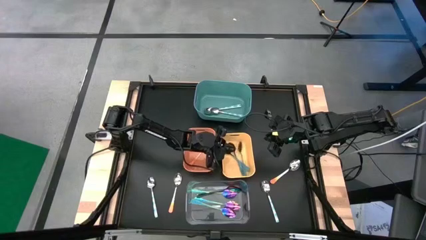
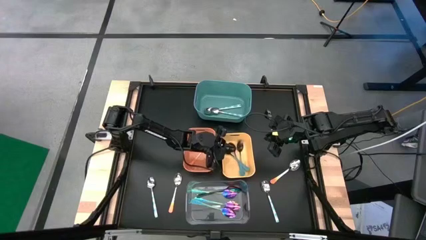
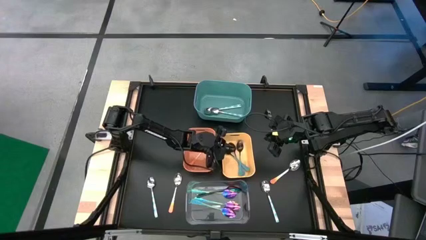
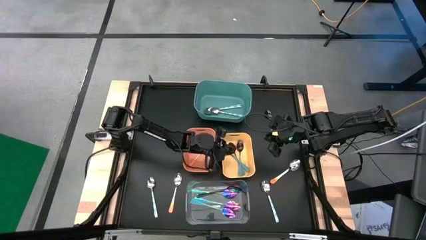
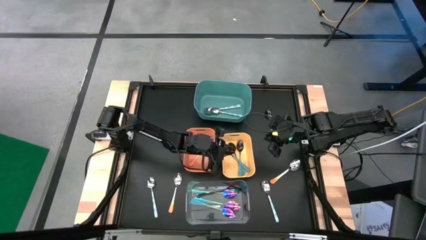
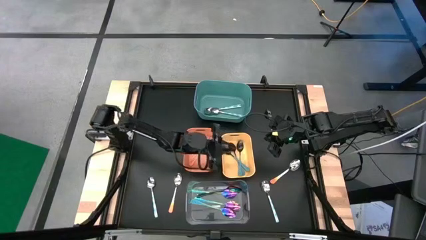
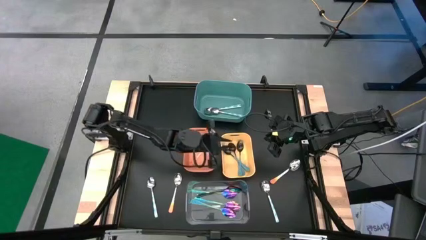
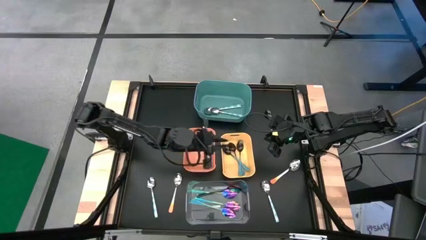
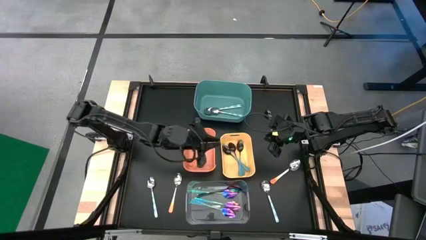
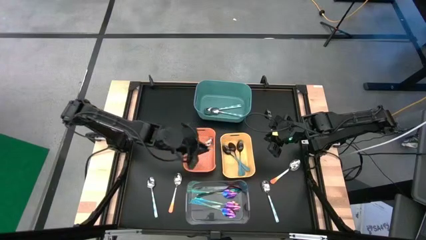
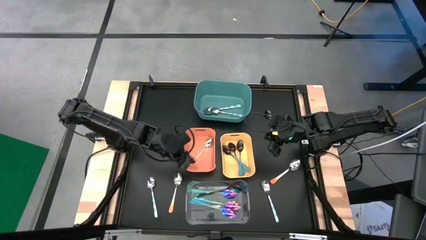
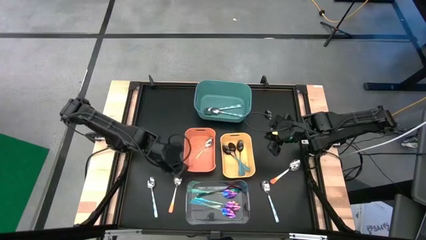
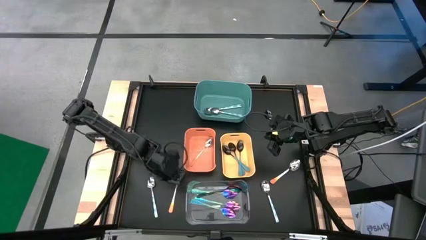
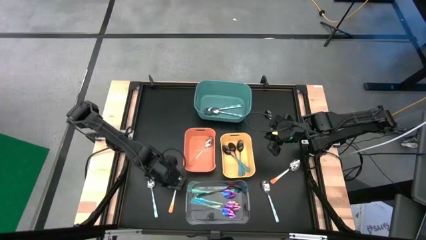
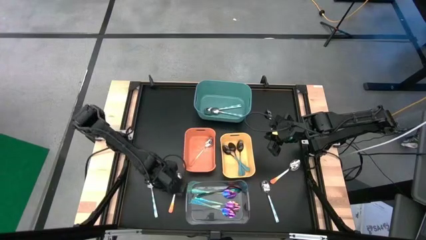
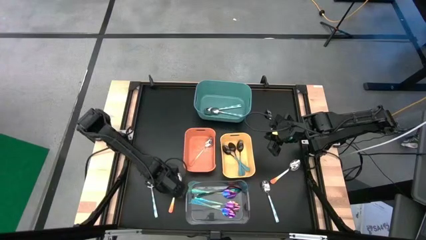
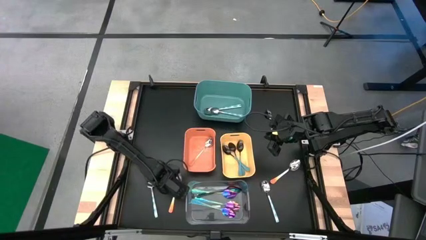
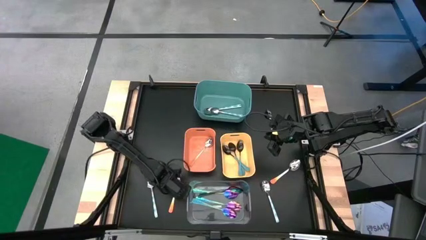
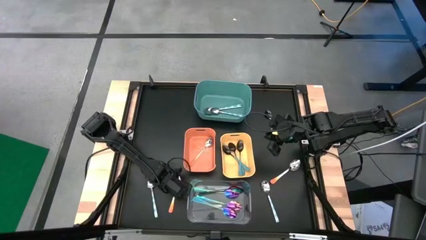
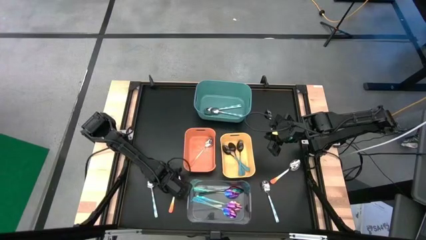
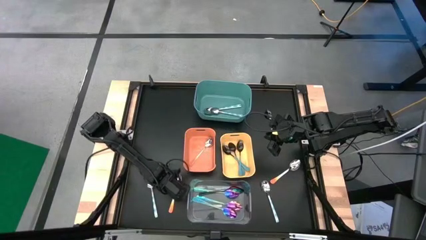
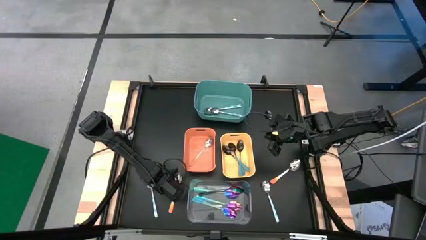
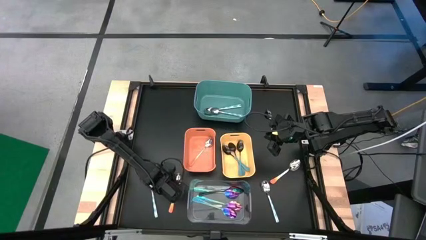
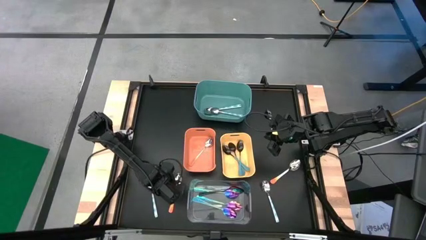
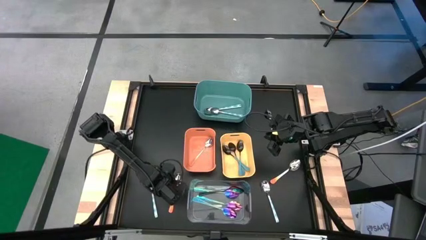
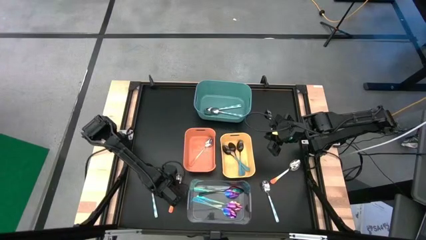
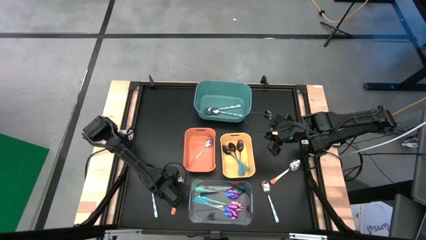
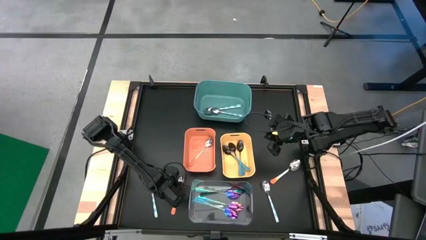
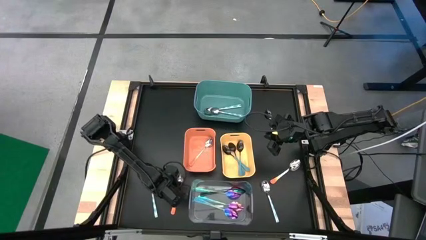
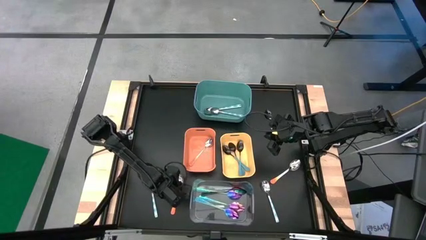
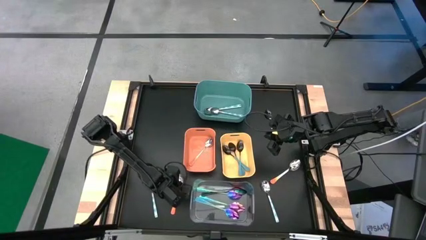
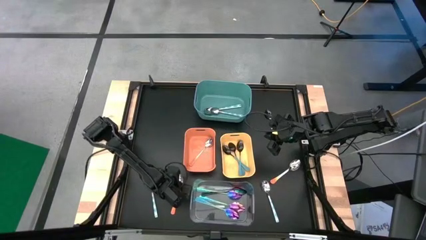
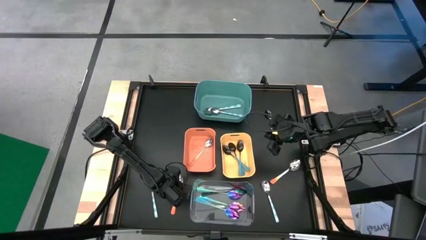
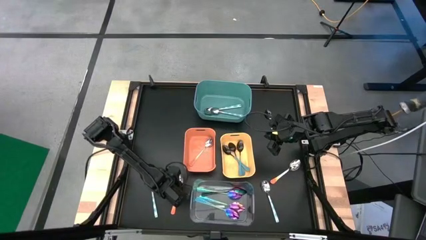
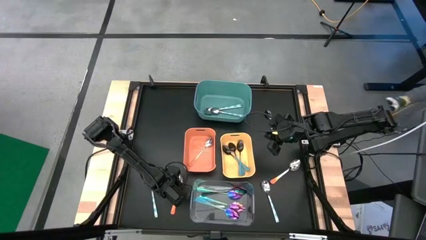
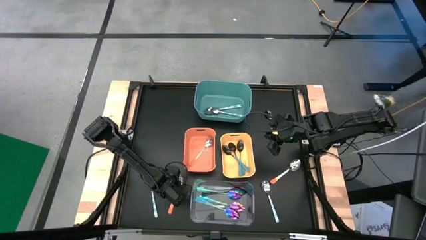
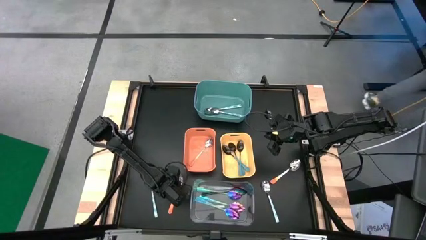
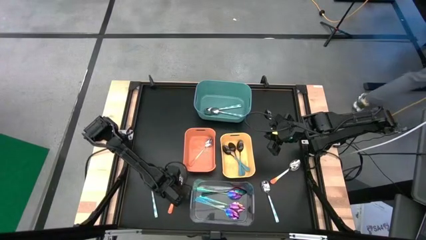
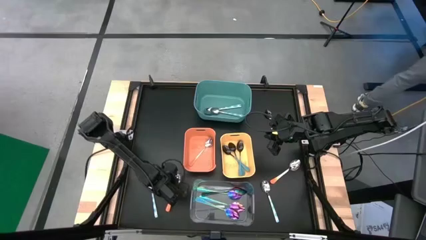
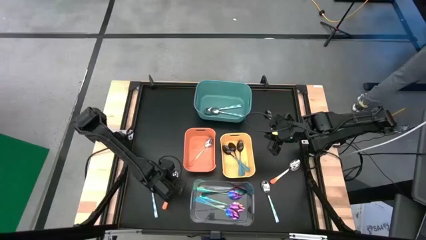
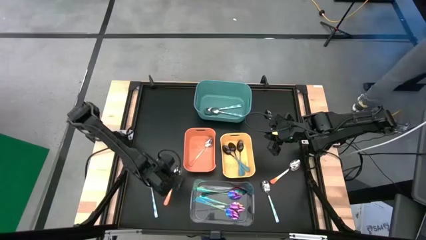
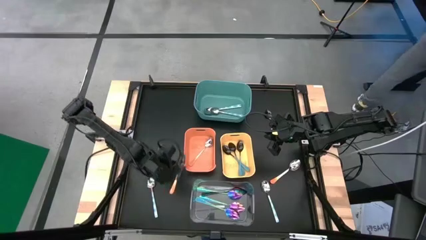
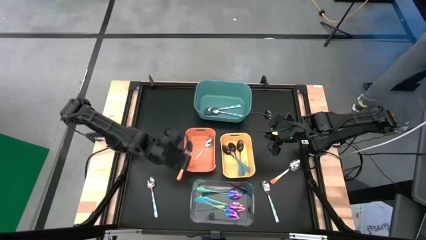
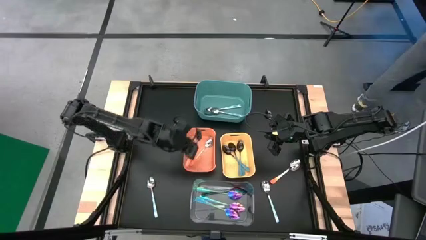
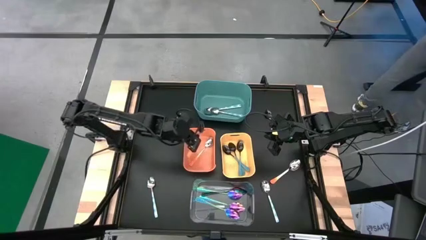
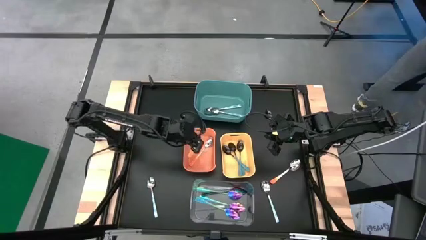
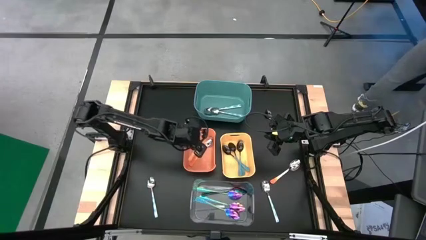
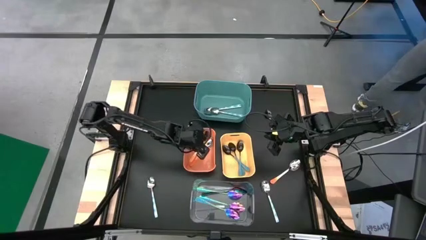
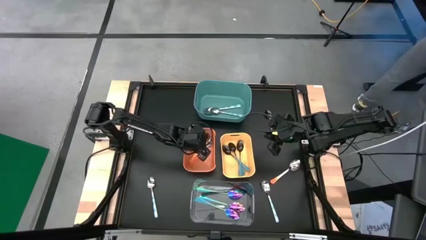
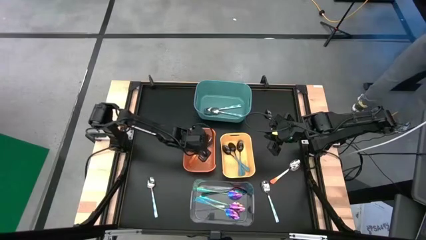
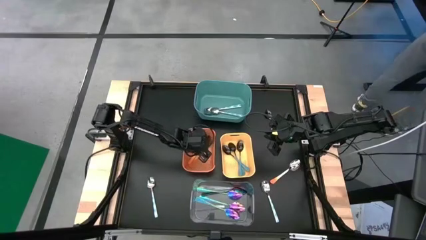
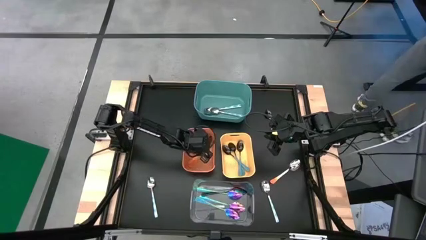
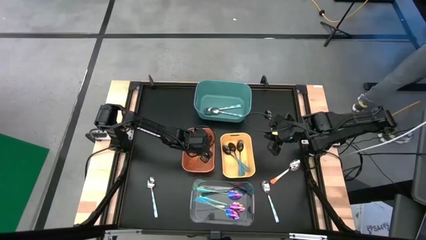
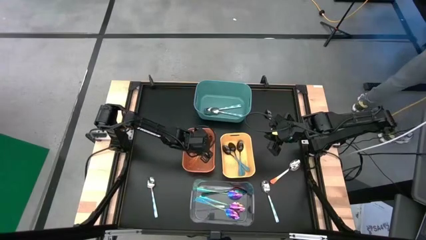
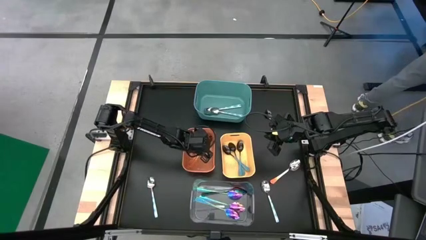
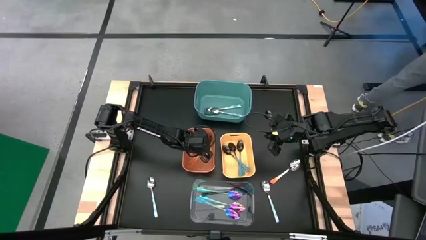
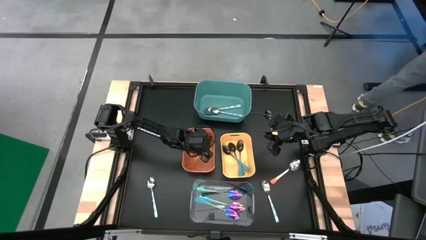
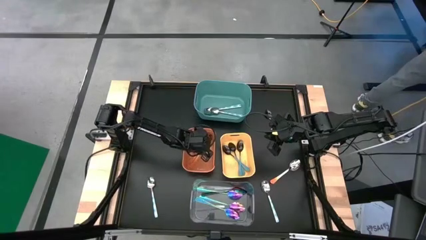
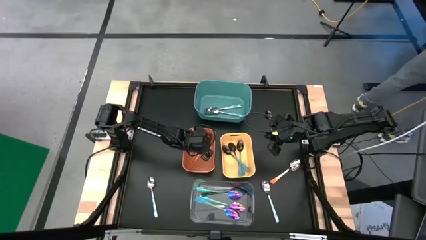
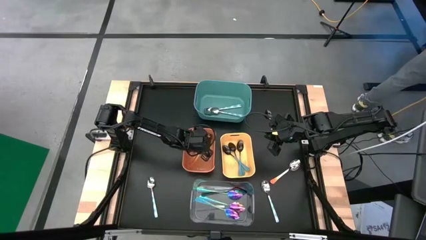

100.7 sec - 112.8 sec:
Task: Sort silverware by color (type)
Put the orange spoon into the orange bin
